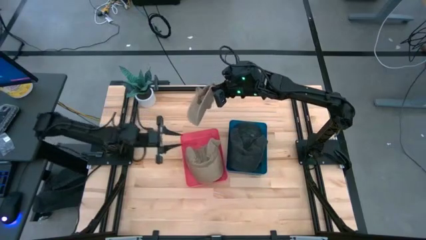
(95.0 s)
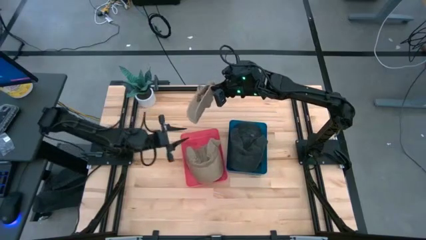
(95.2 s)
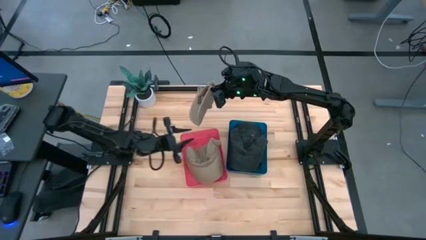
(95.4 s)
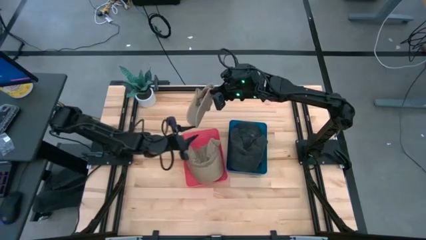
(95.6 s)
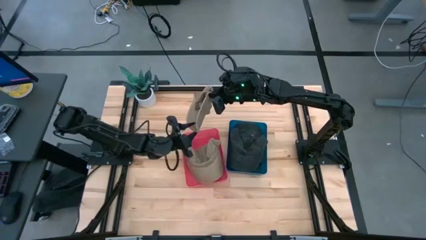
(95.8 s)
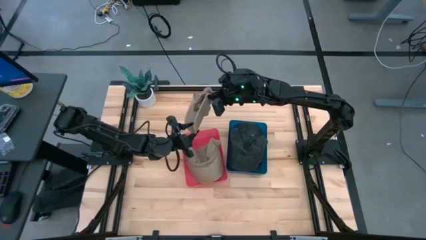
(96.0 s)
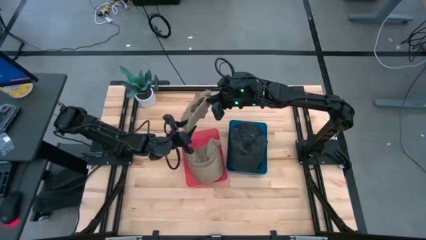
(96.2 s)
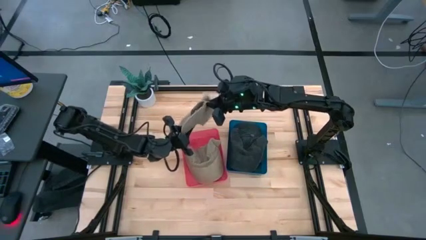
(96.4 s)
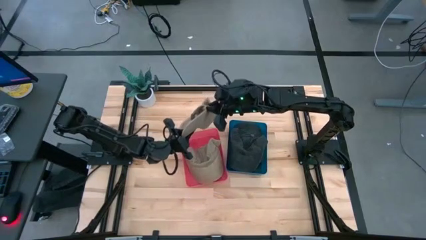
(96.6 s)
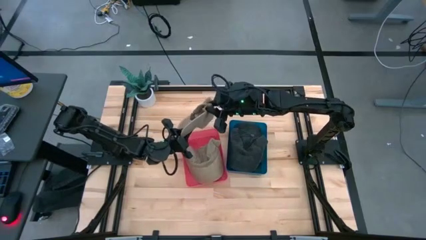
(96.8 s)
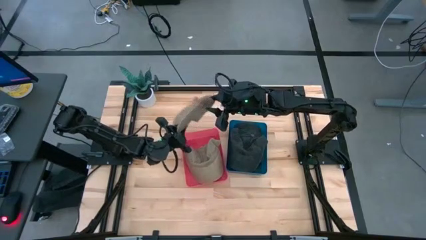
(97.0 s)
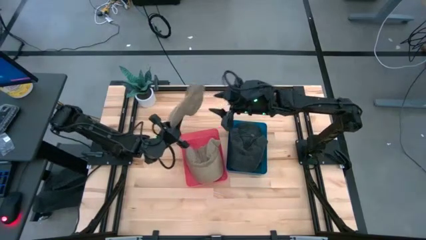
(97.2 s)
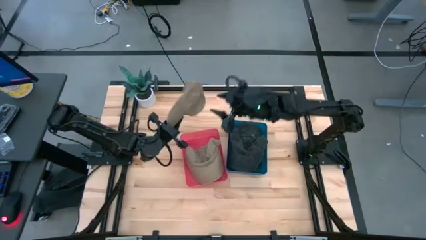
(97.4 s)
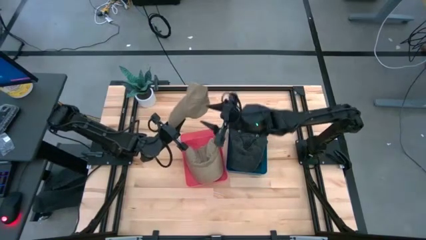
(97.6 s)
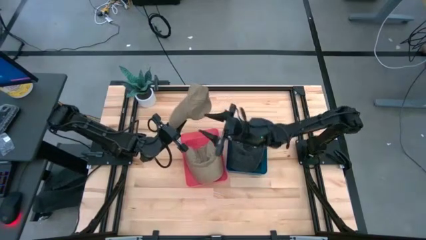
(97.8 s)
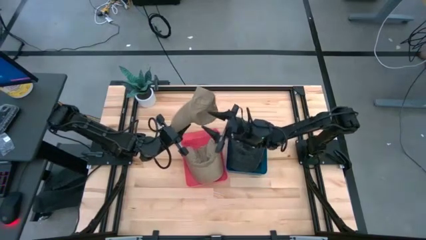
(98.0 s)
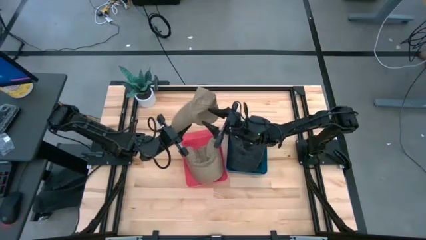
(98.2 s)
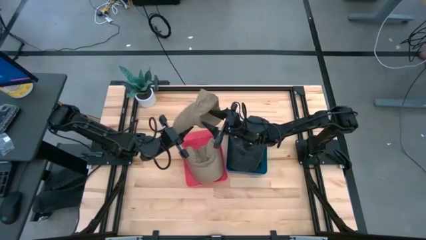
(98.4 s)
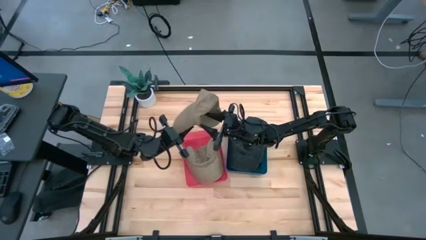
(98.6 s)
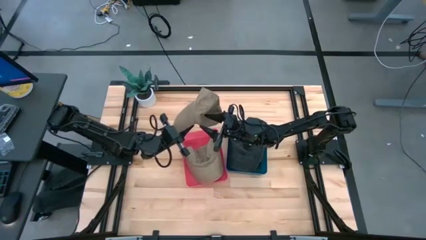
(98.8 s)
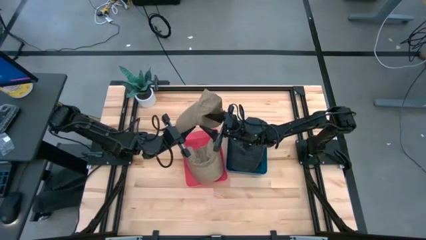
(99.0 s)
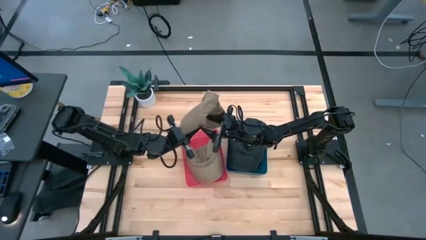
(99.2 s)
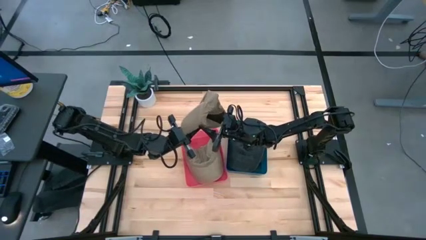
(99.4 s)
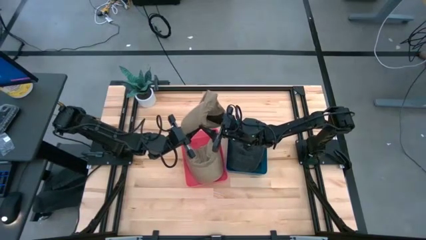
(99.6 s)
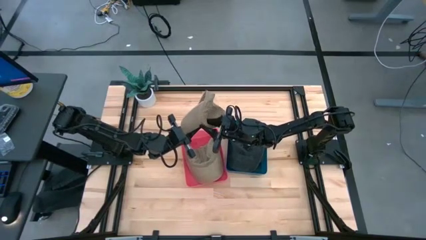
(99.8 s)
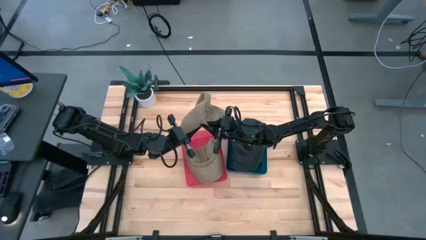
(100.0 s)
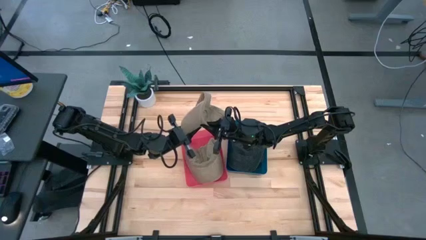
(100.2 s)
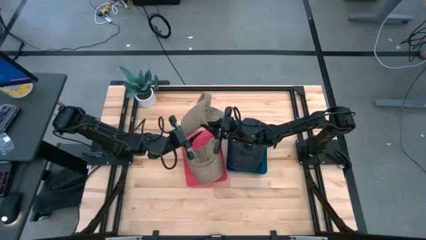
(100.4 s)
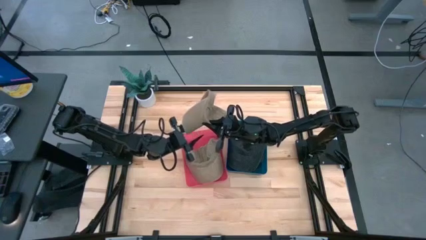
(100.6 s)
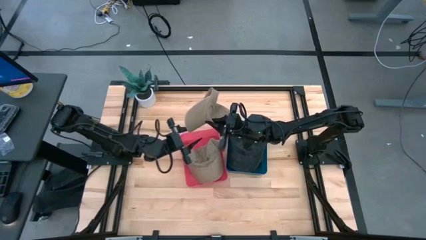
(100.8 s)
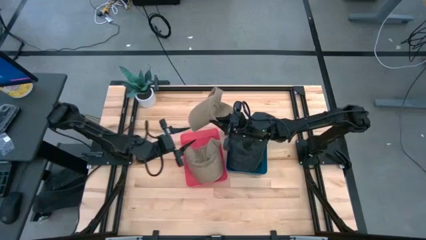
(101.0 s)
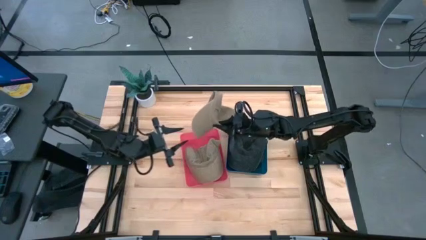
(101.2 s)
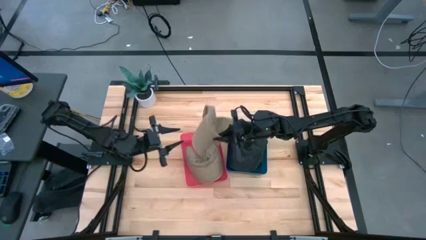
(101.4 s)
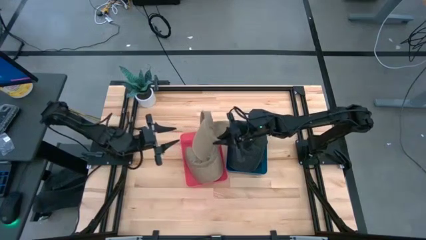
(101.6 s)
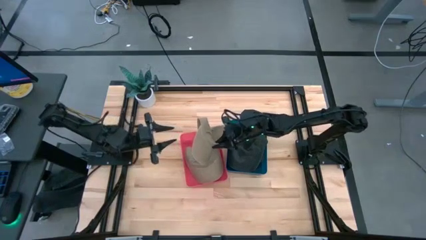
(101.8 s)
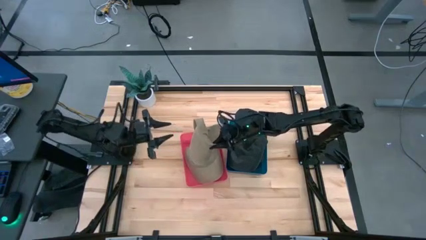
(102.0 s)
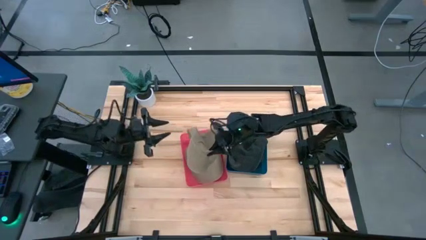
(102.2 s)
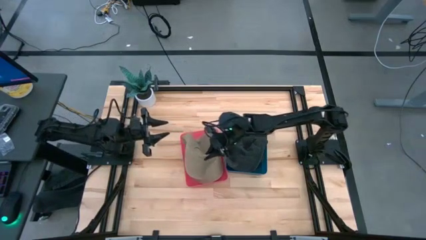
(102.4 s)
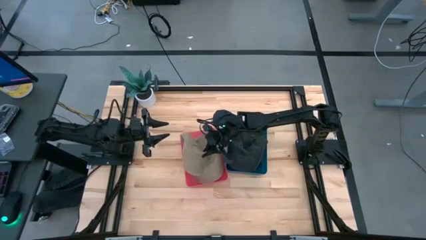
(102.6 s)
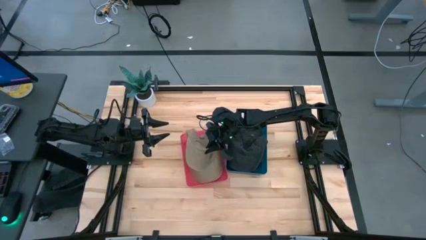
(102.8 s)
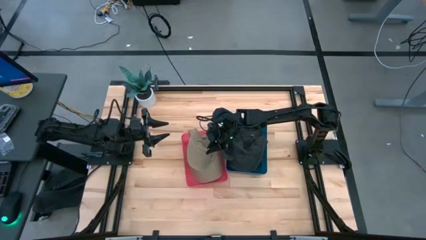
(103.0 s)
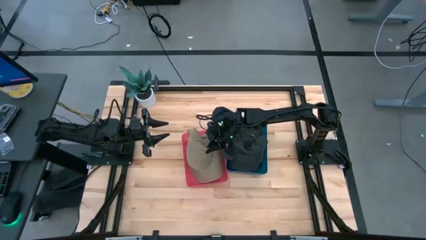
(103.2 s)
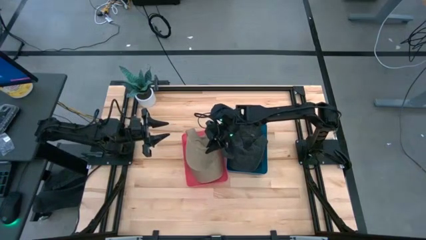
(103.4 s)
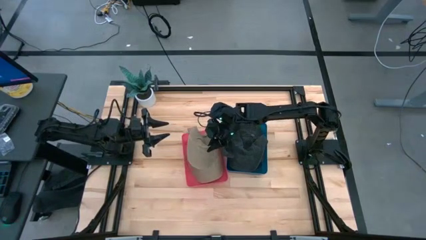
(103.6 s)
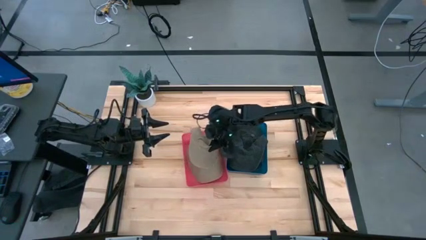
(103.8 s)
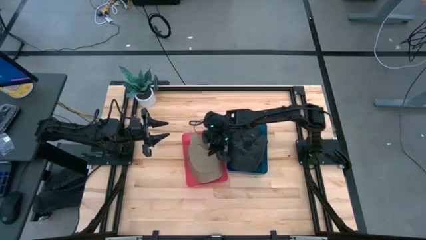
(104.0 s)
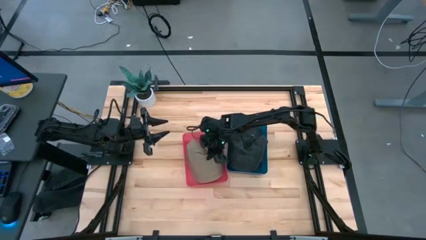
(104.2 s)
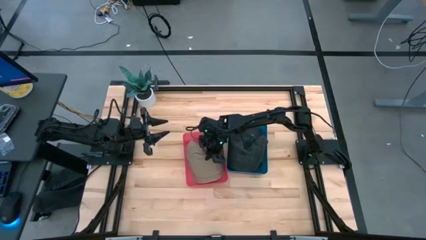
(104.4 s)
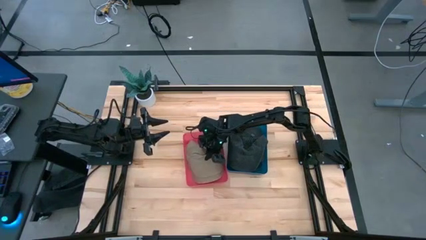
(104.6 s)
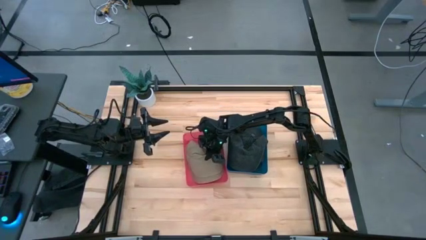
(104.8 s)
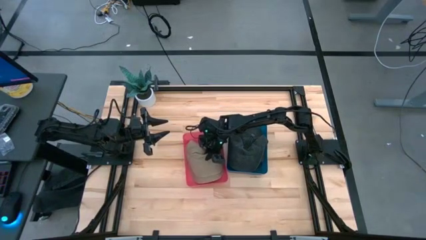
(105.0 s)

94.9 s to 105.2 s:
Task: Pick & Place hat
Put the brown cap into the red bin
